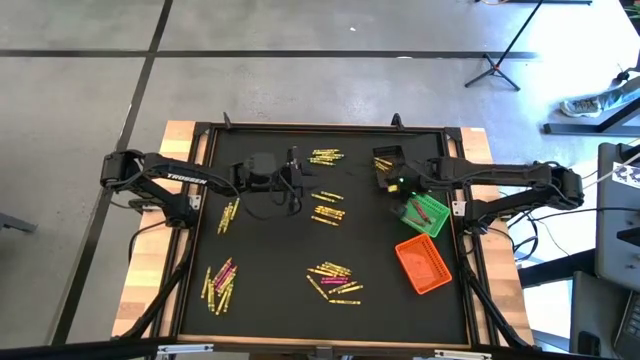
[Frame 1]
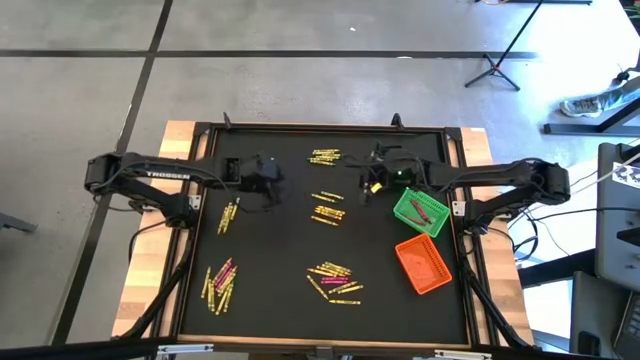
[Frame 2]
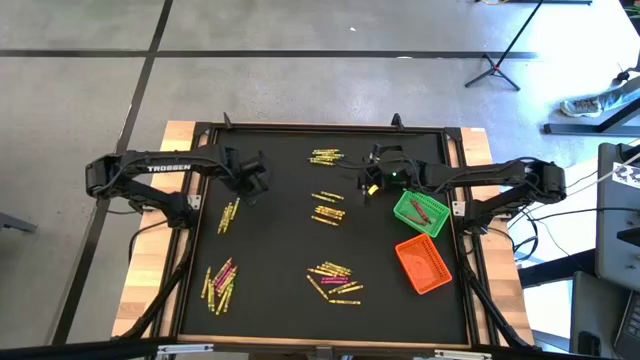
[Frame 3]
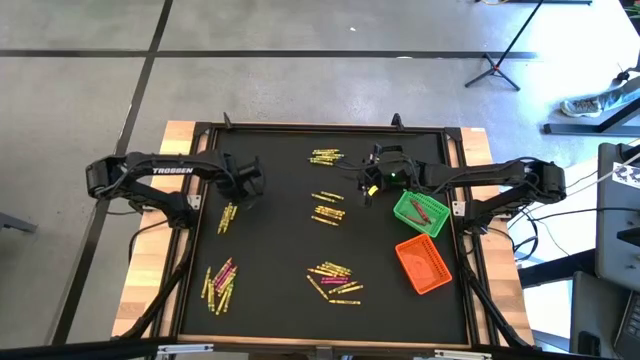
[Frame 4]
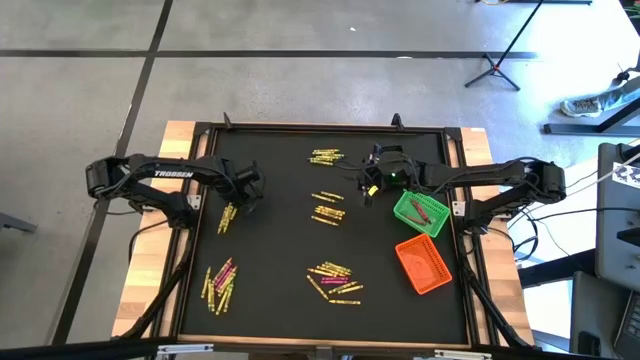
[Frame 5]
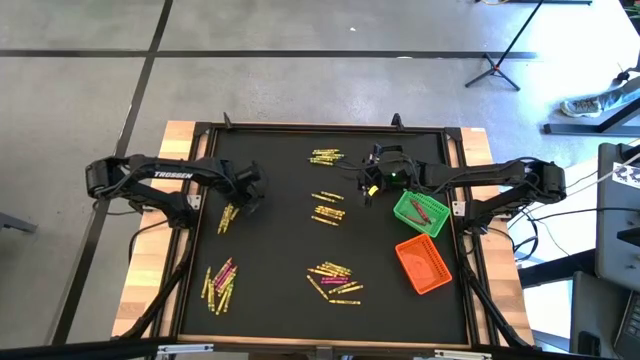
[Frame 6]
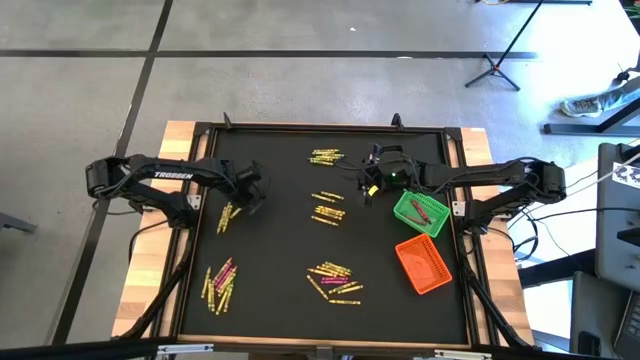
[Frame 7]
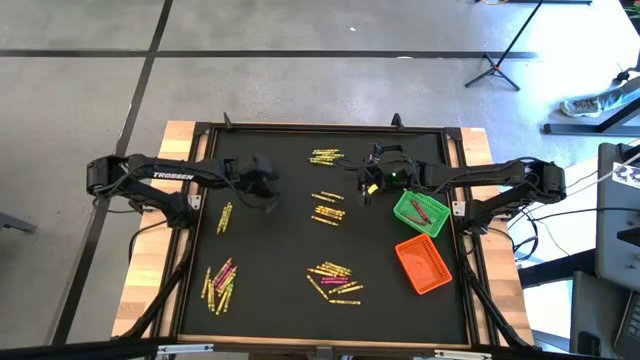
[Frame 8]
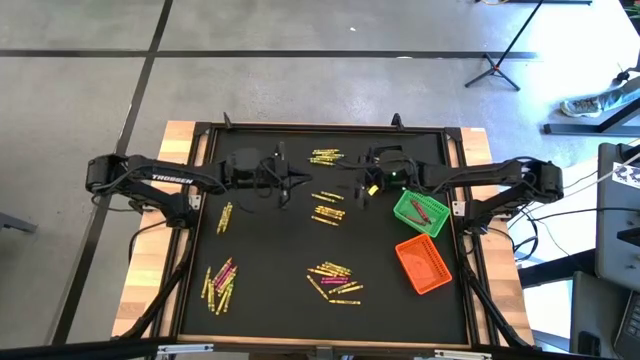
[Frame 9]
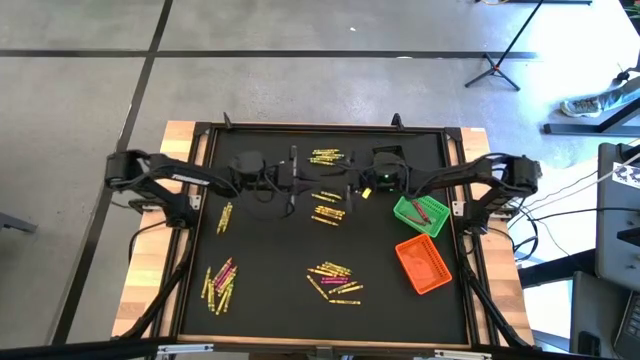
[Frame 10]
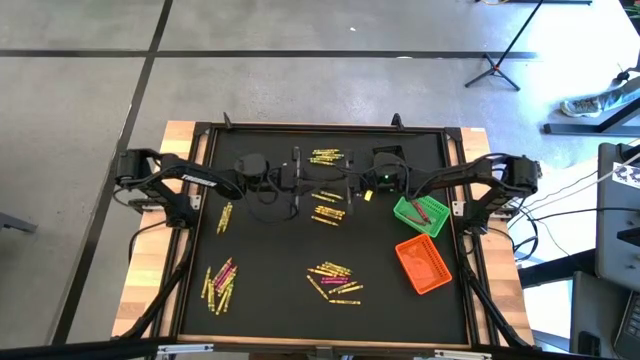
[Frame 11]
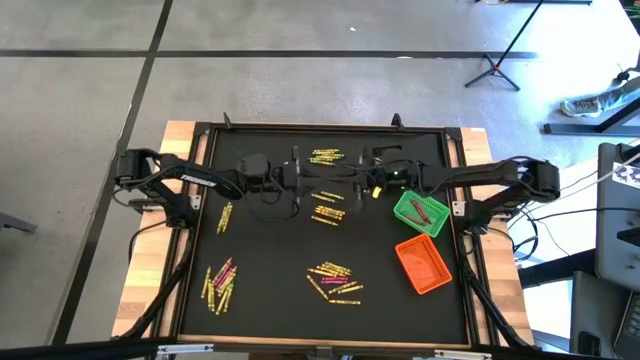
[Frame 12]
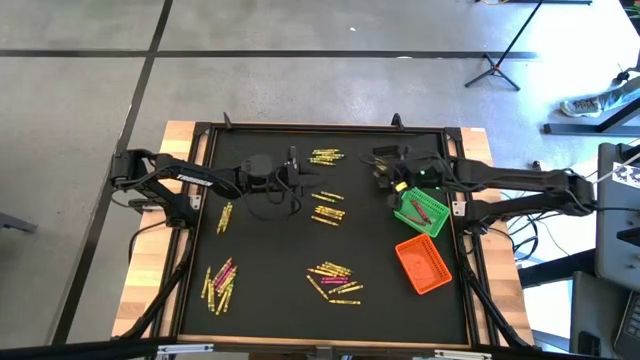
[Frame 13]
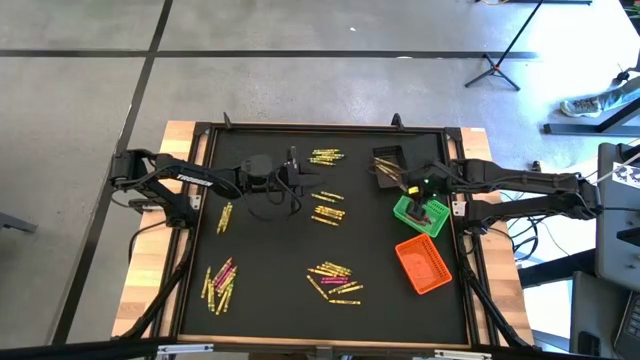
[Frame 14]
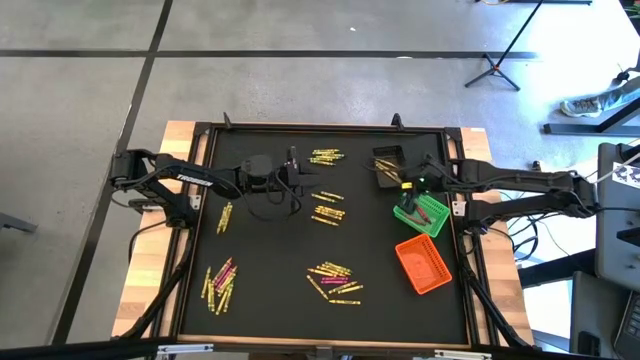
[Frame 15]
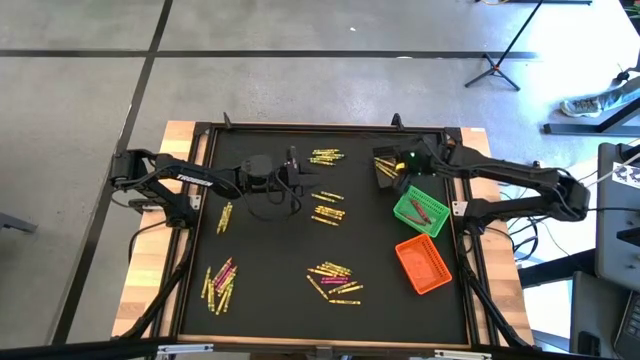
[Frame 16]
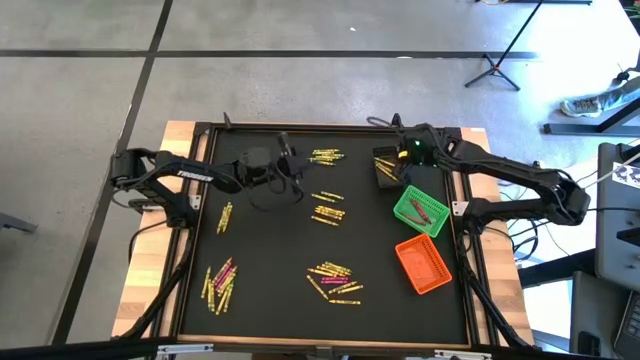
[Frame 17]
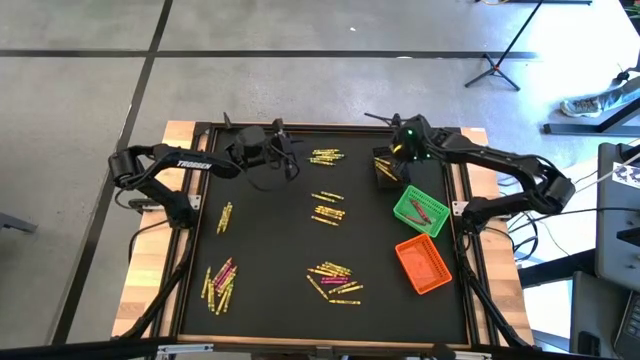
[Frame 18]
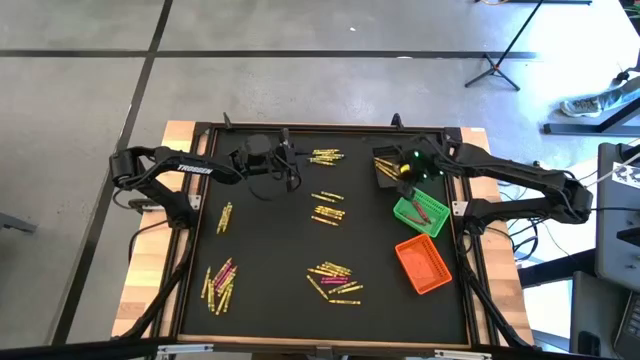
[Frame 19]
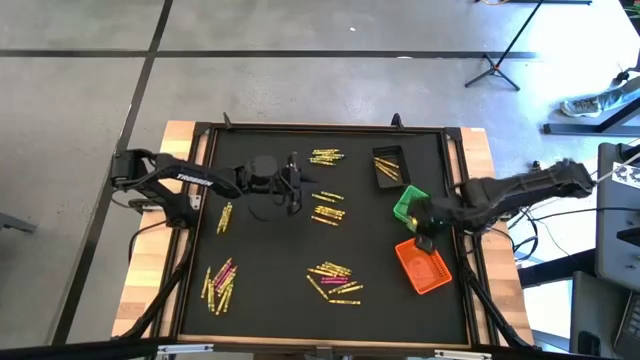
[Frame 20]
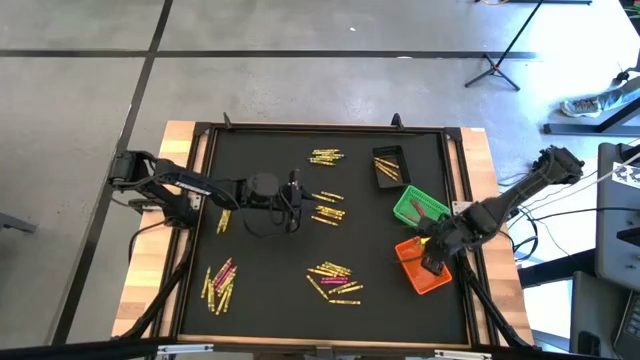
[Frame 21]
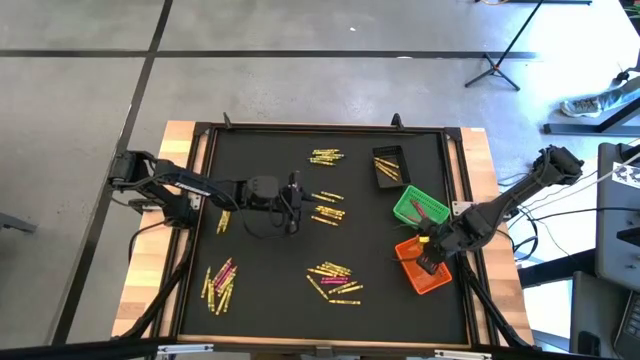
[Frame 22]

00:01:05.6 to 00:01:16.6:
Task: Sort crayons
Put the green crayon into the orange basket

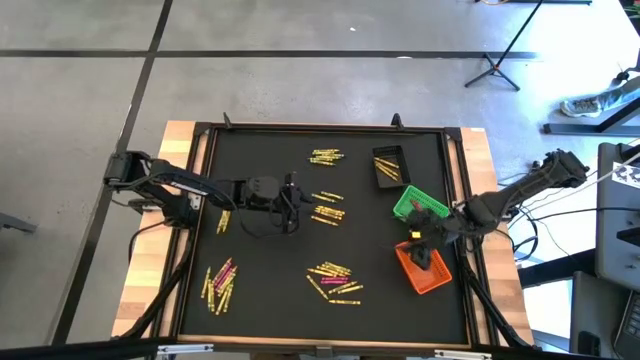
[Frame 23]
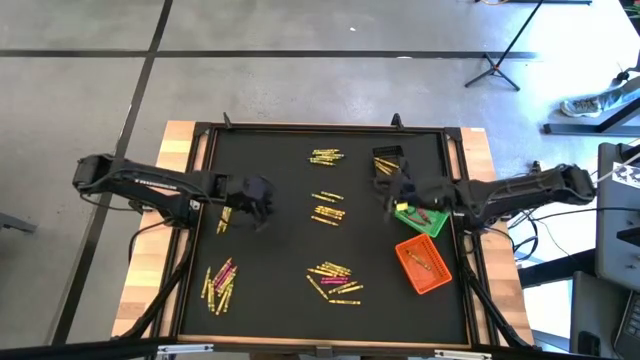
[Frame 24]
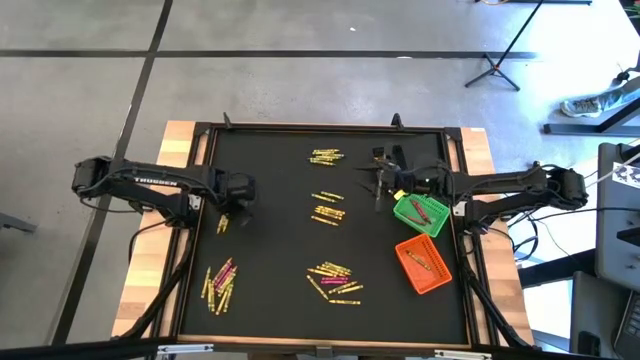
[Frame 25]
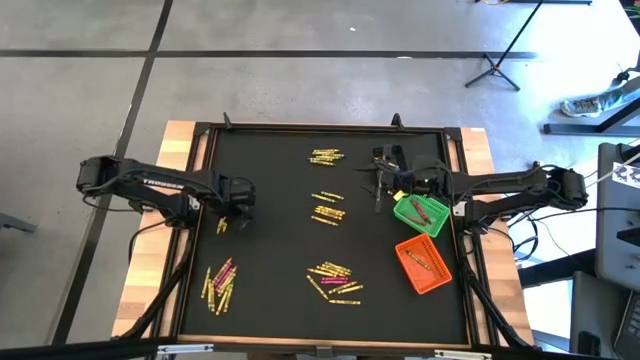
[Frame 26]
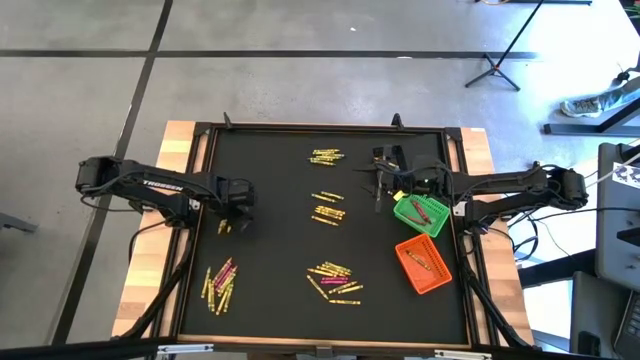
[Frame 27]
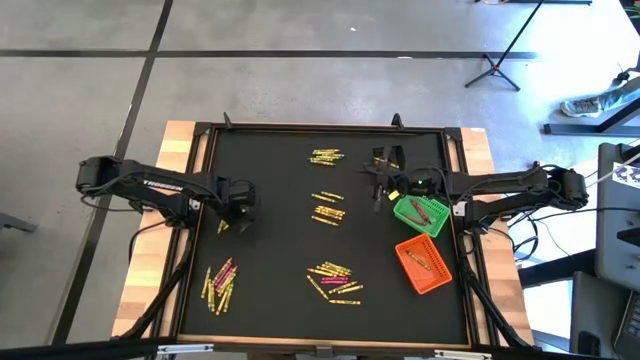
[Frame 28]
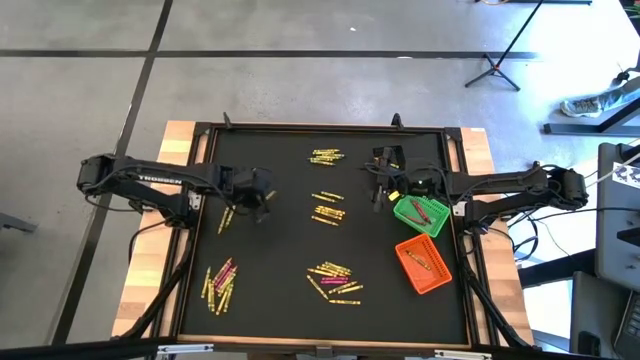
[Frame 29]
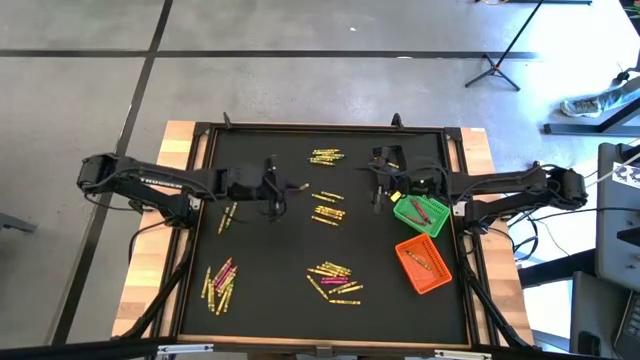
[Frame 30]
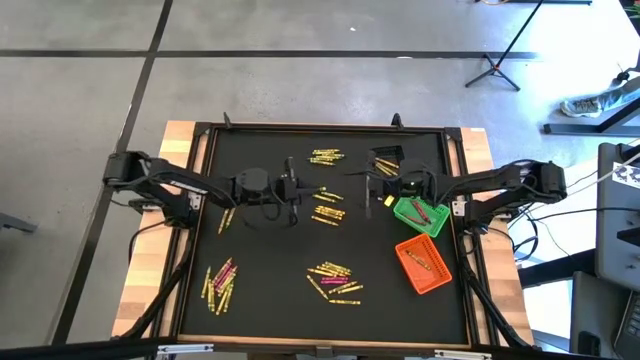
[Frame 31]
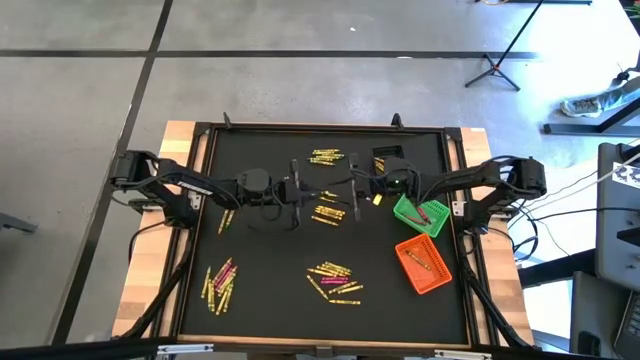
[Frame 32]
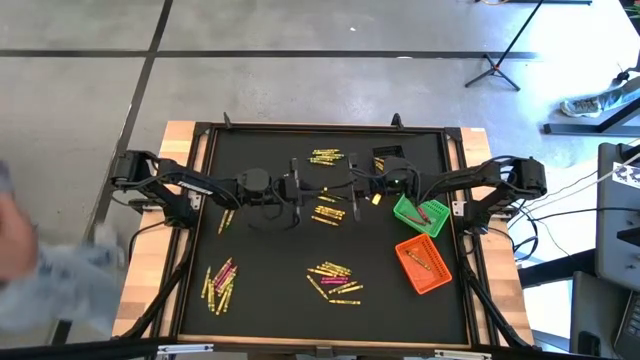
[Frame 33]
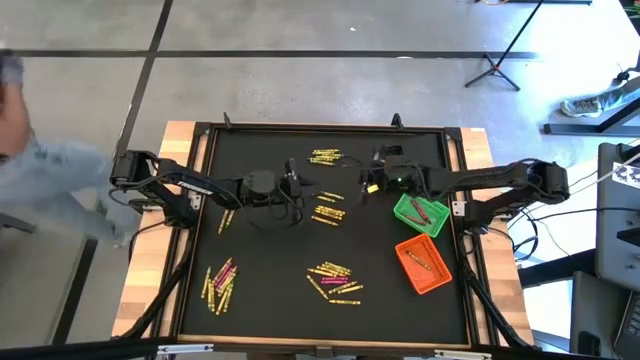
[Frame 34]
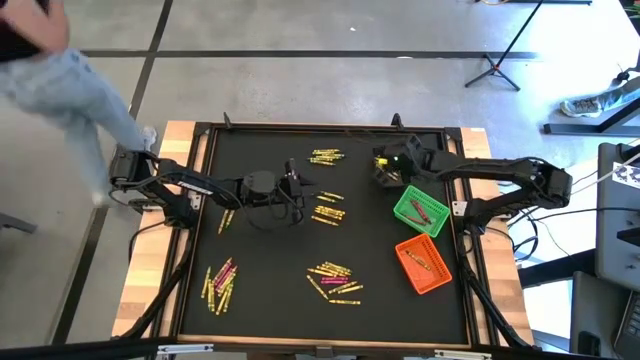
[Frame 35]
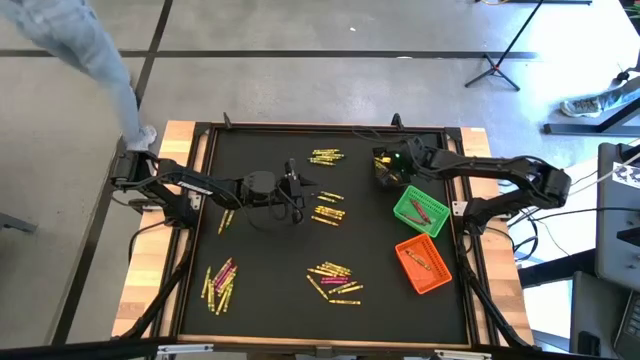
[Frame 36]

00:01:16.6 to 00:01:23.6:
Put the yellow crayon into the black basket

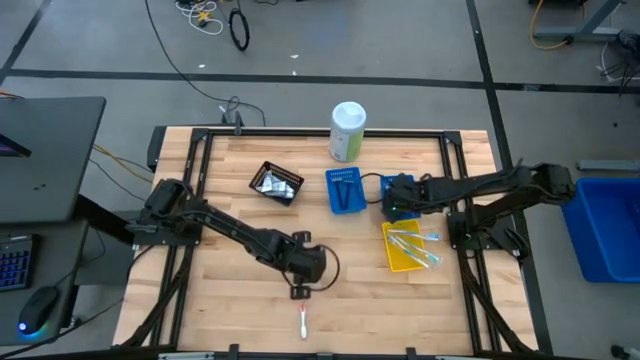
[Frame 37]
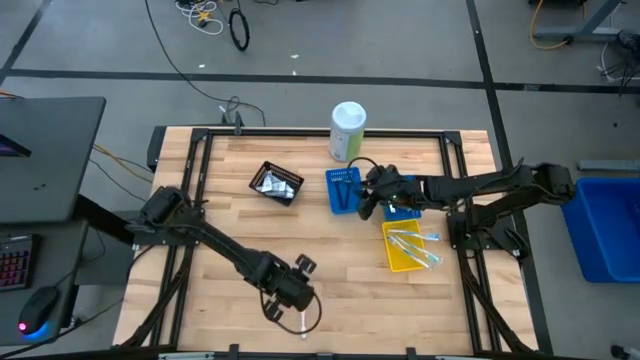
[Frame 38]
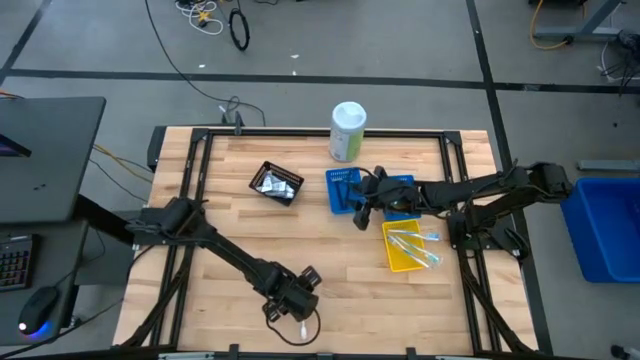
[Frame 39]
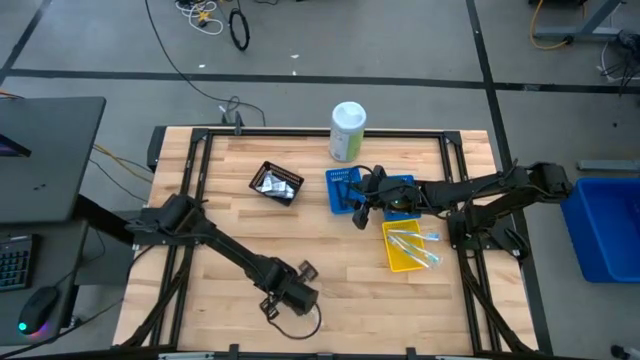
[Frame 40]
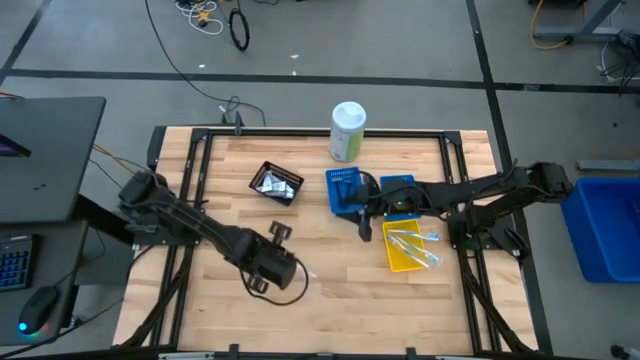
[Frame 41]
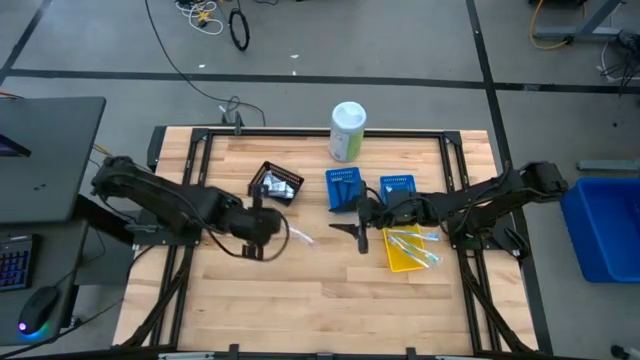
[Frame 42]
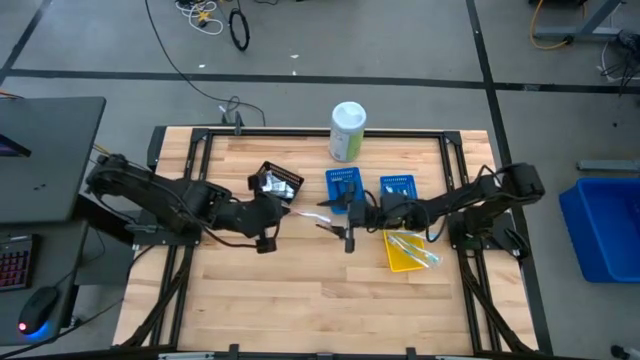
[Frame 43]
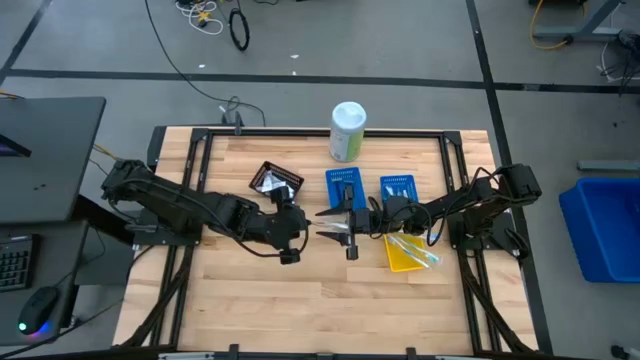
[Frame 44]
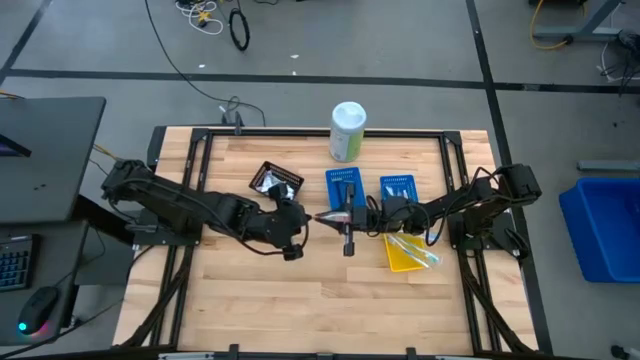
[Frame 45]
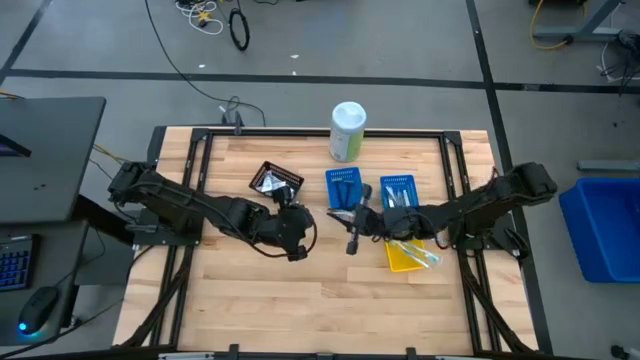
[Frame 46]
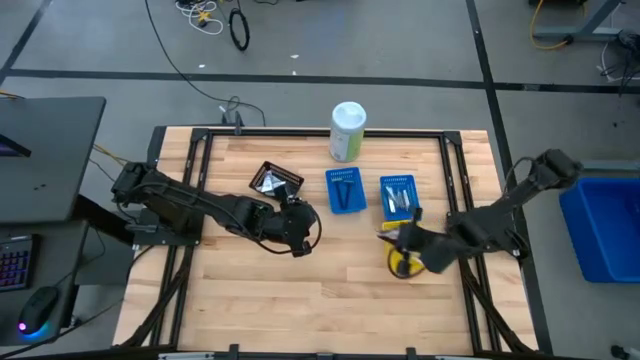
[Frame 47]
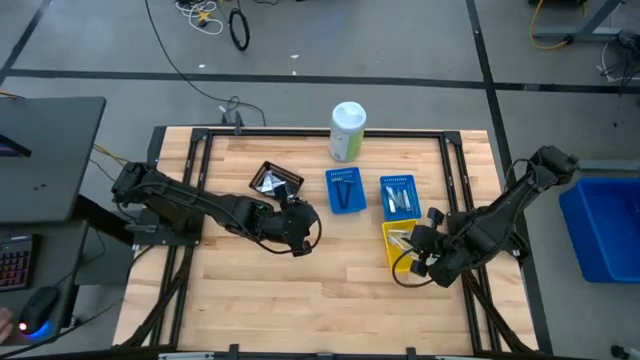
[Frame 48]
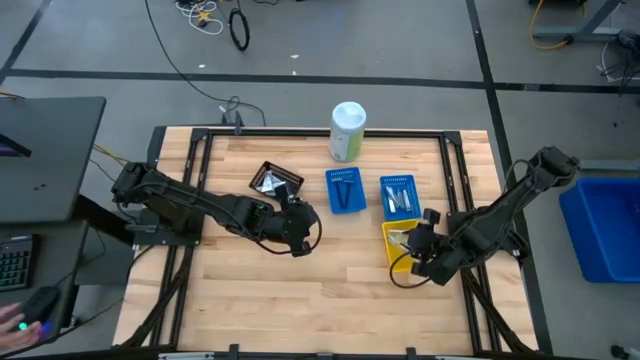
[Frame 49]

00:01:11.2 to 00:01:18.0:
Task: Pick & Place Travel size toiletries
Put the orange toothbrush into the yellow basket
